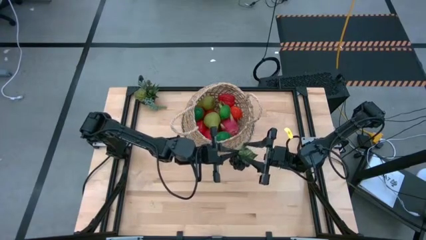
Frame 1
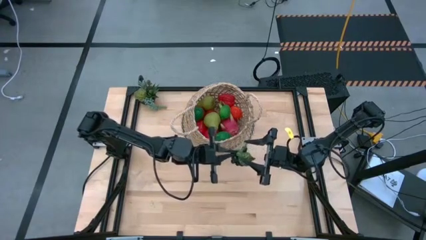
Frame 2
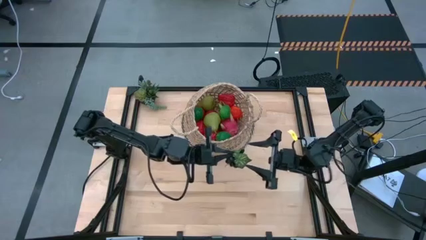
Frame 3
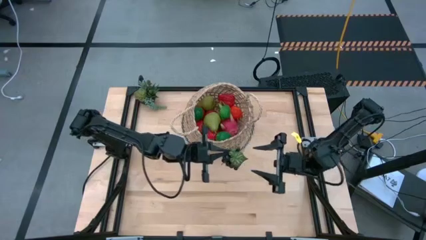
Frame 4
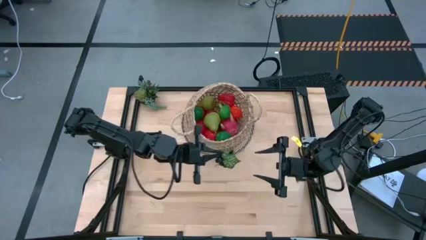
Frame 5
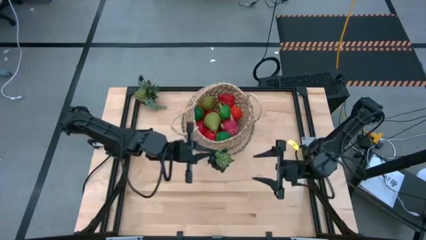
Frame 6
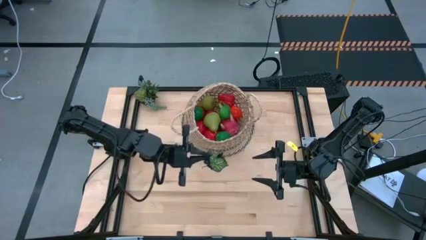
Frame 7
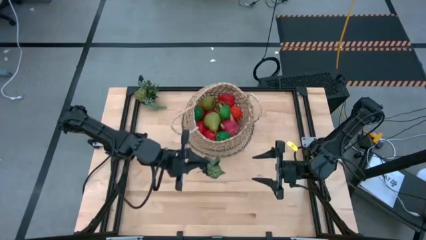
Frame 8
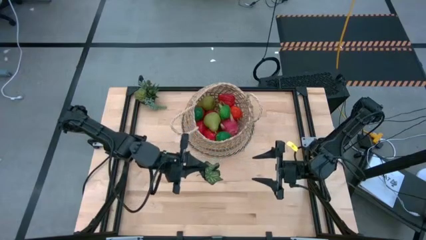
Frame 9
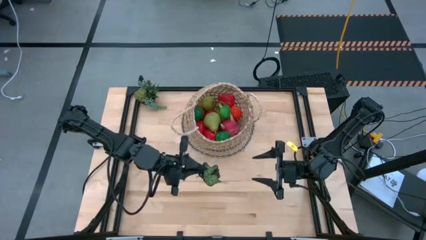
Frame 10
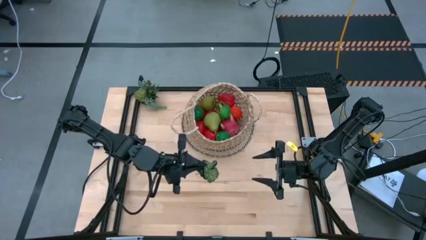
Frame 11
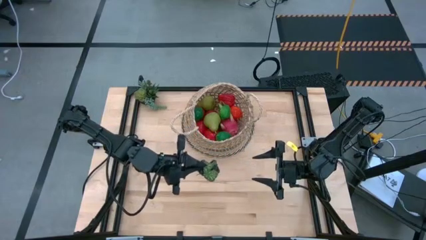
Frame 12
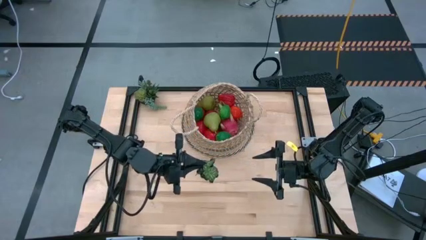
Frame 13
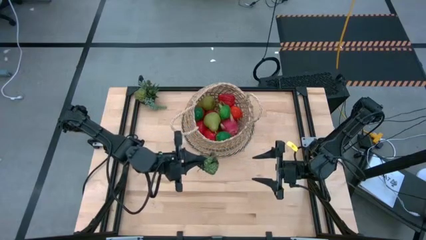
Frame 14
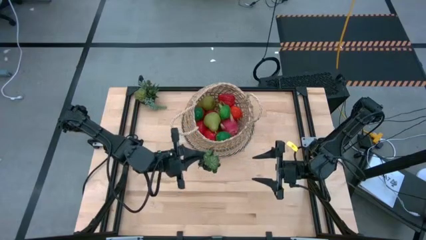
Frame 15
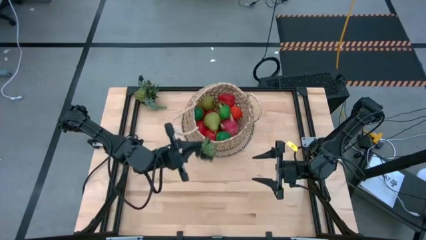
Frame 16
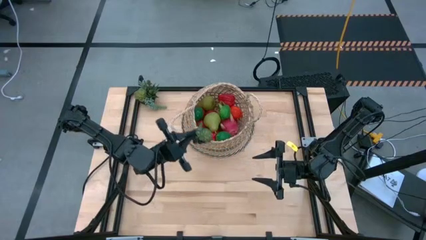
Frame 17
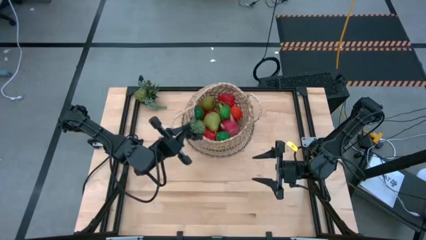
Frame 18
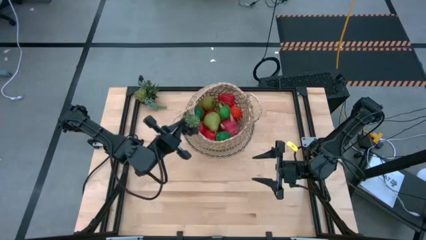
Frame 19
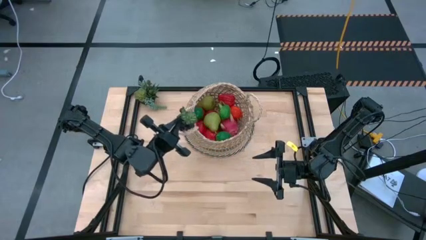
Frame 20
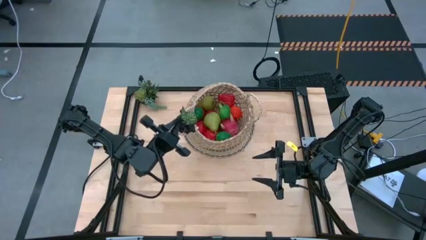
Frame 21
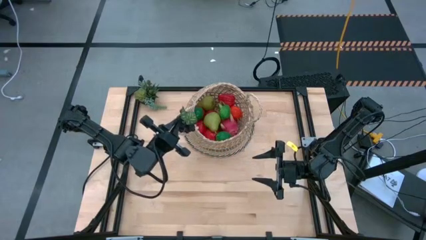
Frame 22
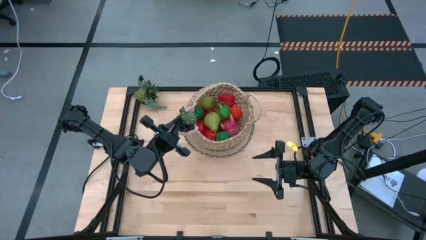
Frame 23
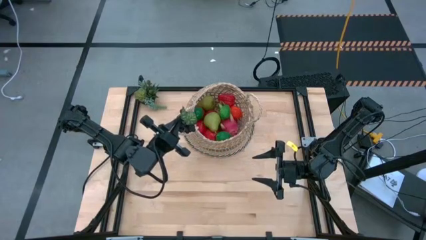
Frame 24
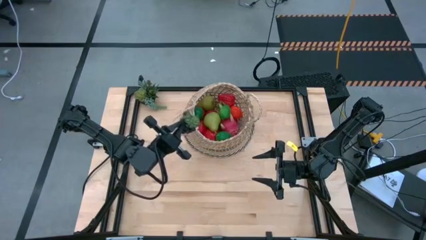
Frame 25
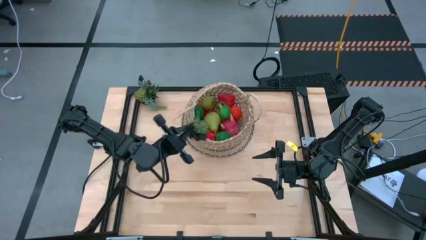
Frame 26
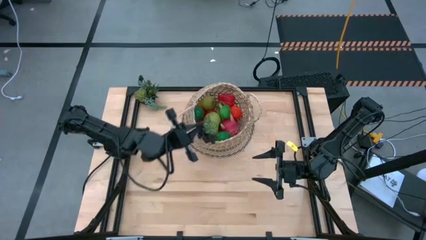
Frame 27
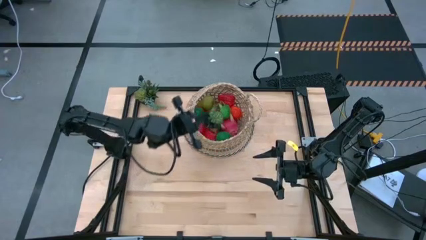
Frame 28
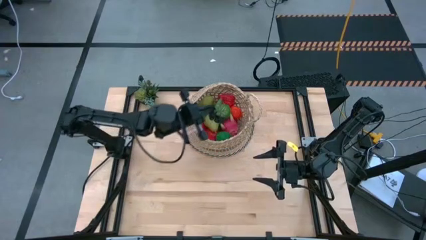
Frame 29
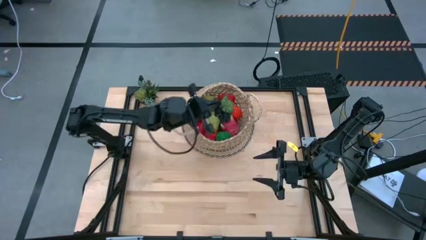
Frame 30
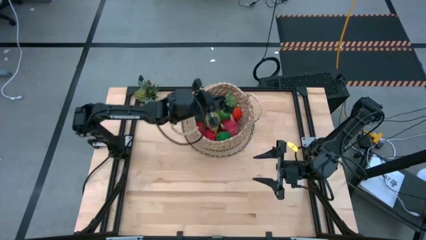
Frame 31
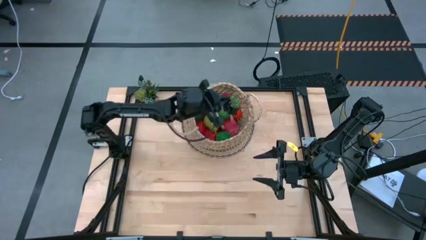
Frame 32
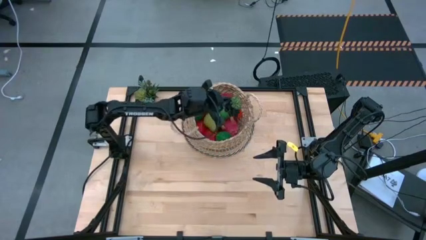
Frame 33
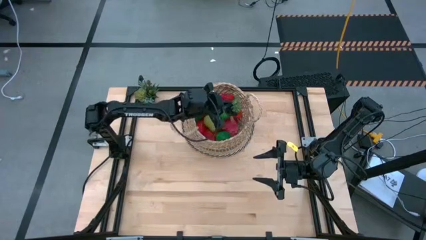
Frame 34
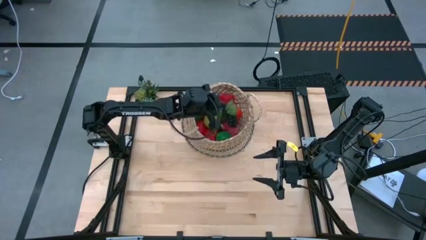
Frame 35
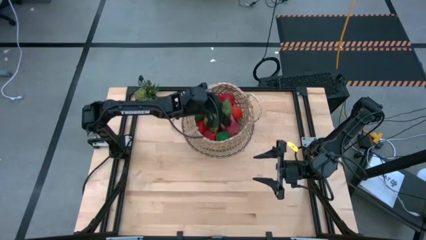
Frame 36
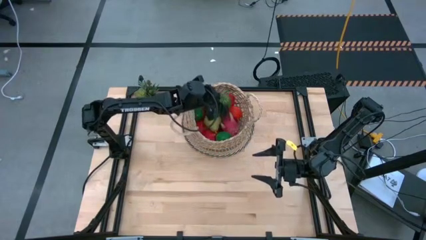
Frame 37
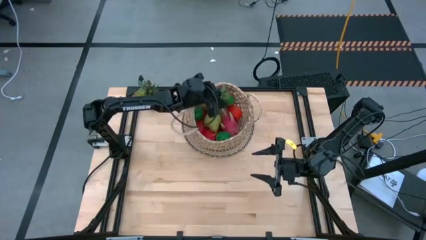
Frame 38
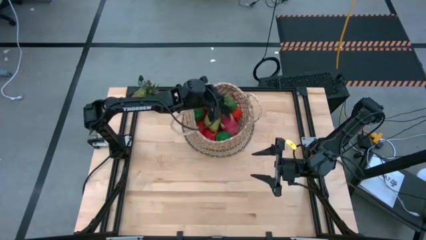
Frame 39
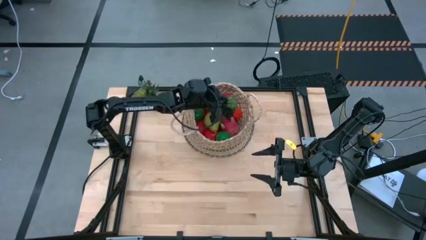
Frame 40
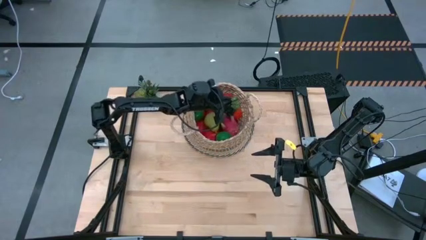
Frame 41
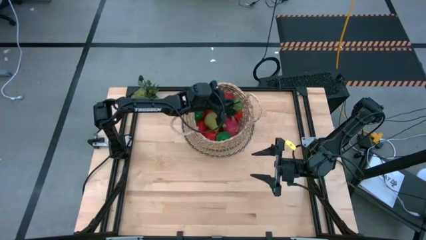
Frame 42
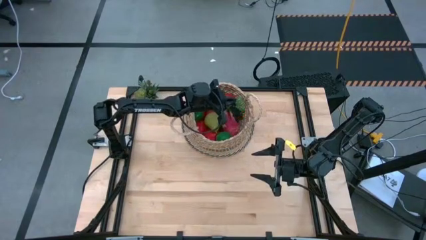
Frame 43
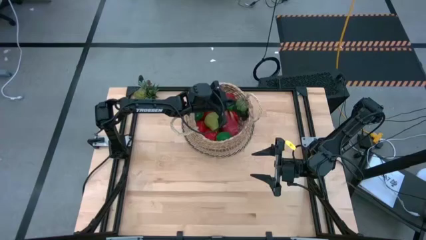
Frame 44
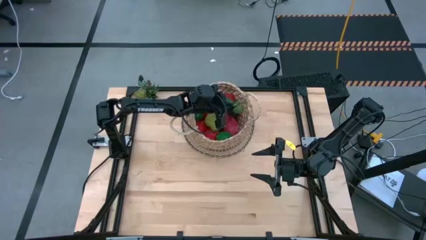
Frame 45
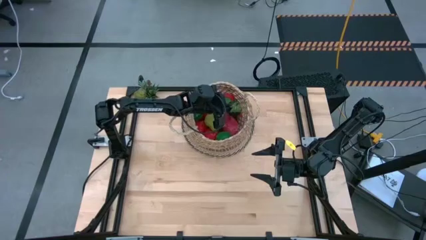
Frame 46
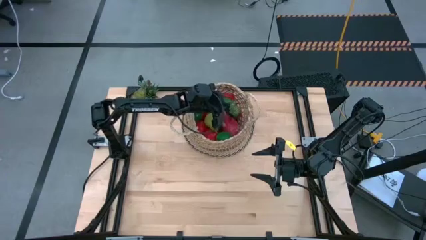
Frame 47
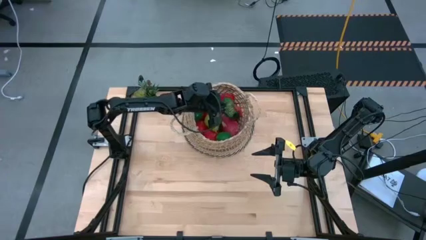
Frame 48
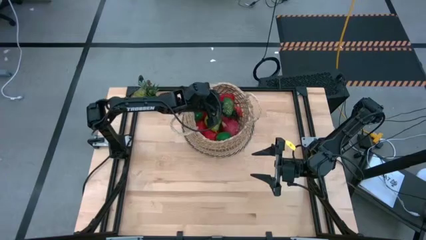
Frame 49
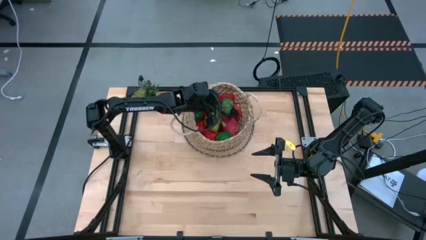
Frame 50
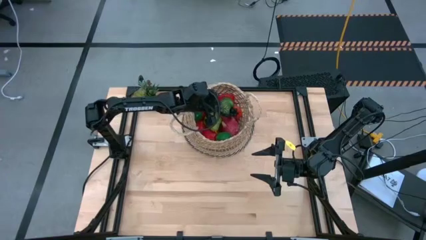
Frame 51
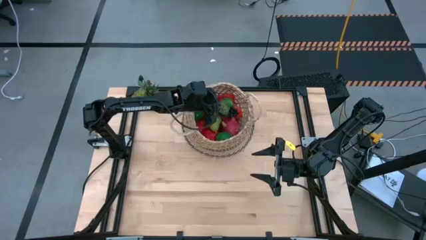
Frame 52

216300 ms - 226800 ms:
Task: Build produce basket
Put the grapes into the basket

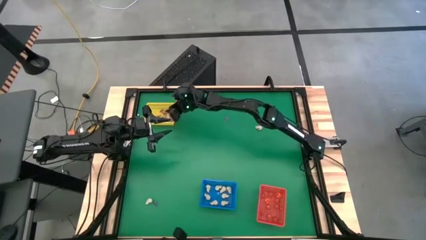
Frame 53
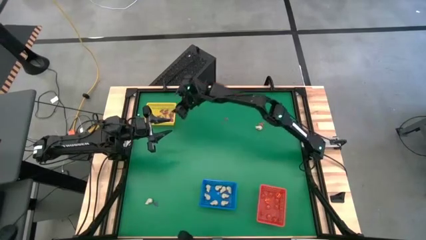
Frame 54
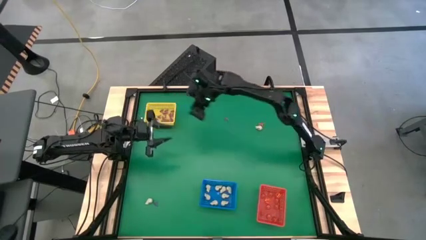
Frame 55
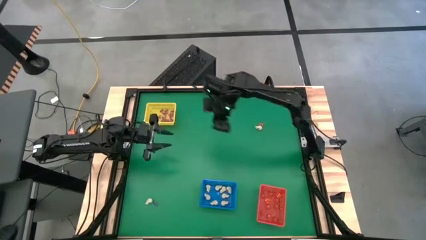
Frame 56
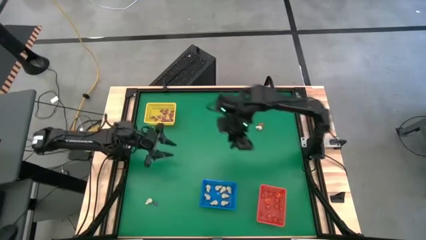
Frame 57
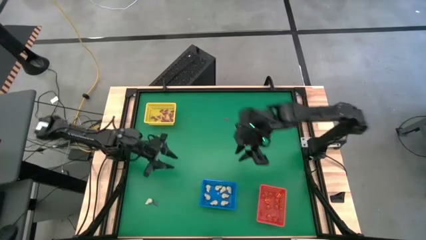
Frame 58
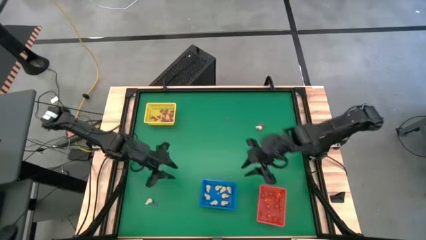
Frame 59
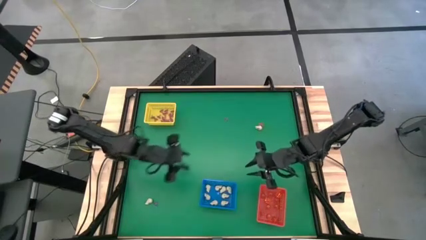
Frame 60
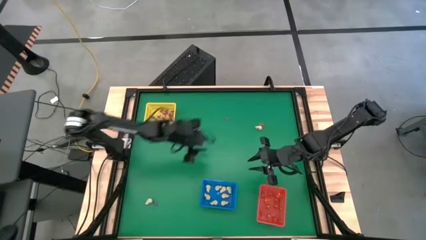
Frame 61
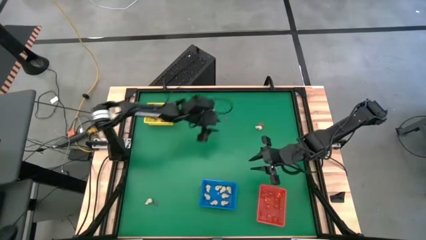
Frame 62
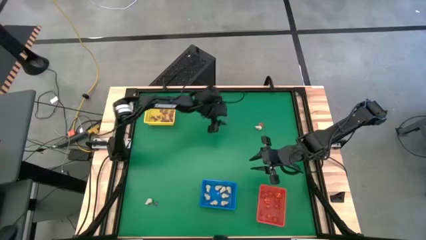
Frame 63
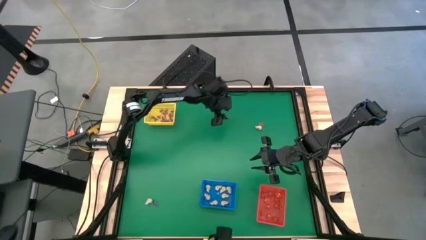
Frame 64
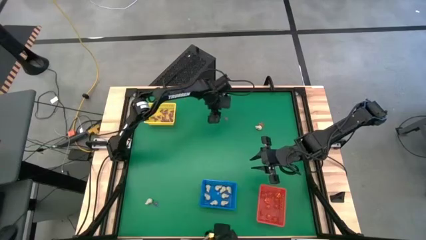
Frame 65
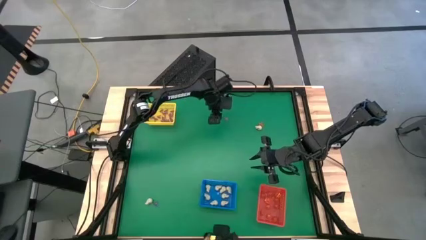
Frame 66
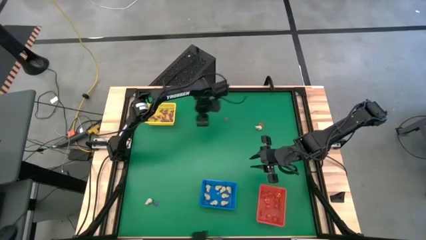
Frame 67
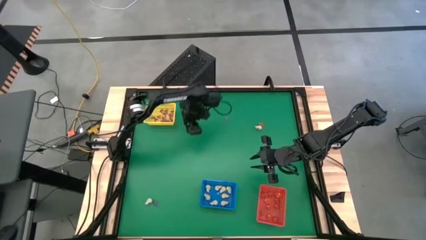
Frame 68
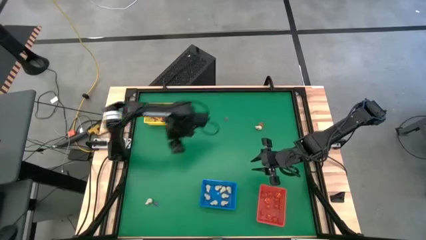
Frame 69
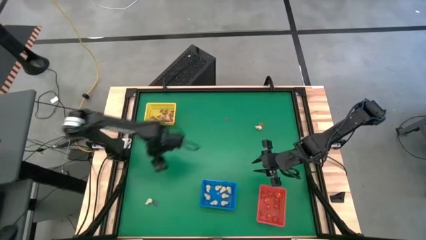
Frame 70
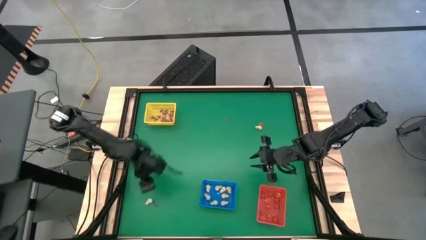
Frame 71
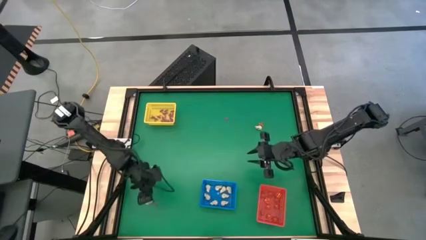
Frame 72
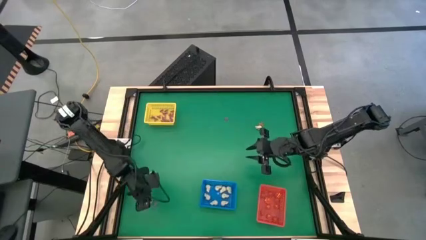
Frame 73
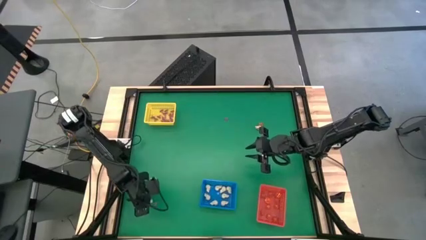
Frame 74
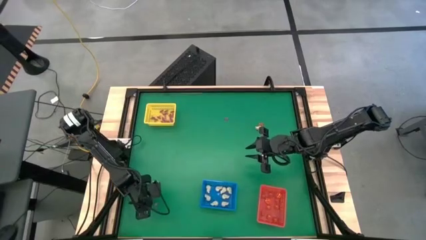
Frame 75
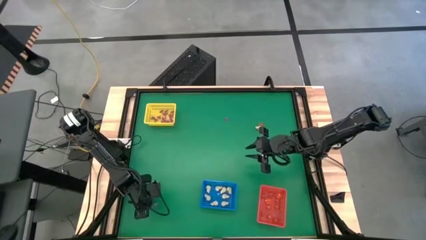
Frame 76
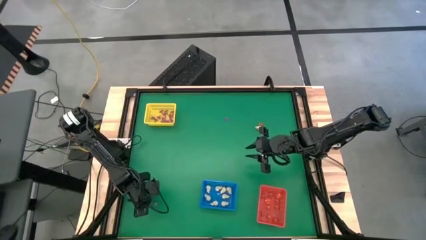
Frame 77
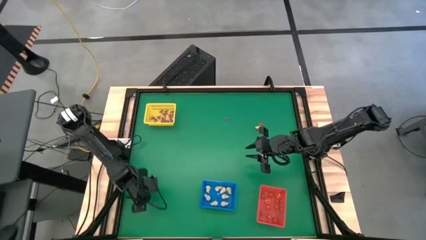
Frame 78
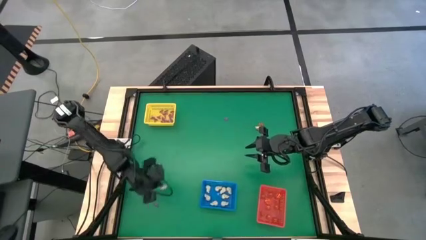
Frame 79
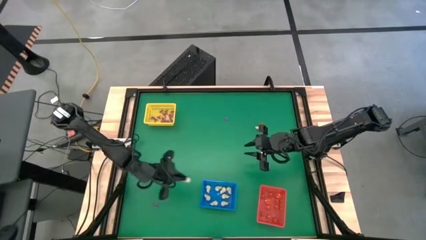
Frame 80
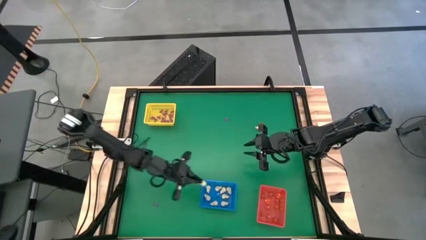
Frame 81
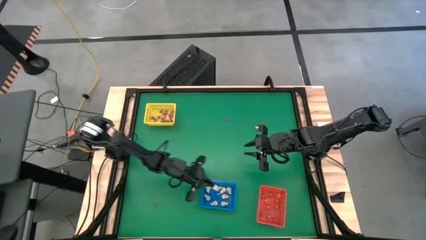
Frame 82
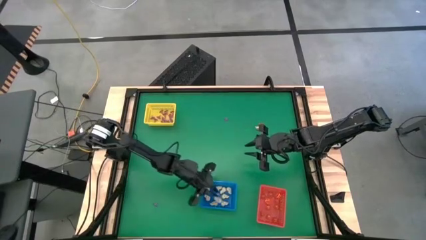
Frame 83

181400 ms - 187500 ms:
Task: Sort Halloween decoration
Put the white skull toy into the blue basket

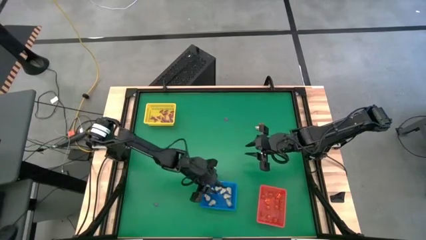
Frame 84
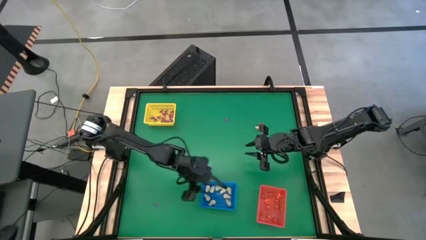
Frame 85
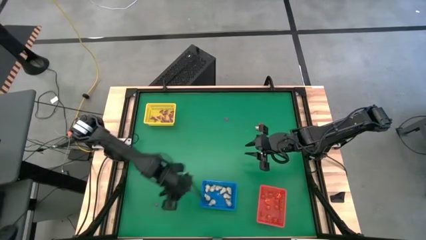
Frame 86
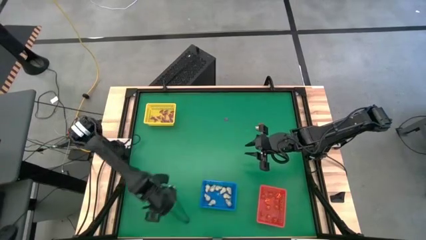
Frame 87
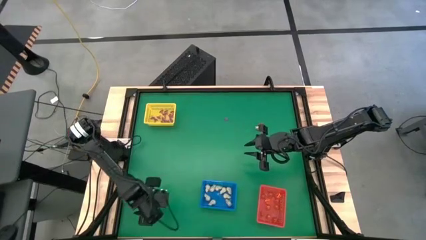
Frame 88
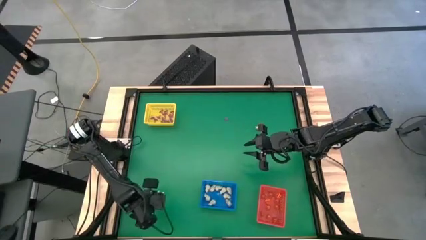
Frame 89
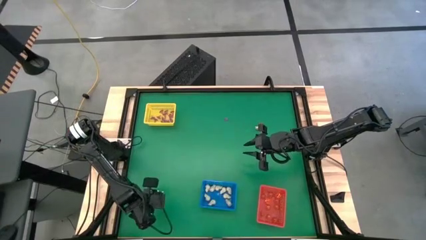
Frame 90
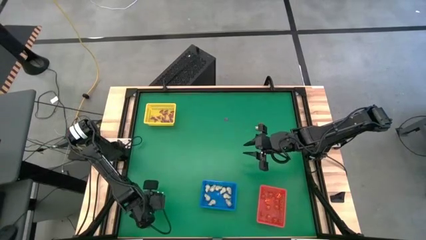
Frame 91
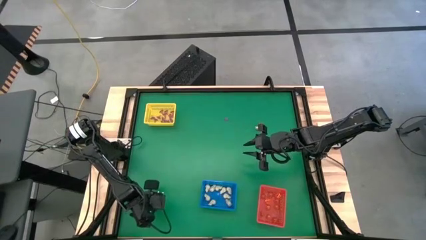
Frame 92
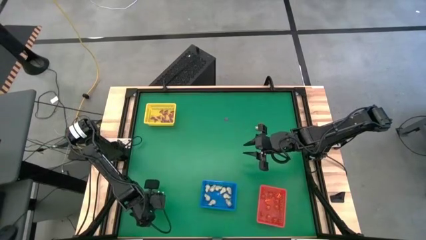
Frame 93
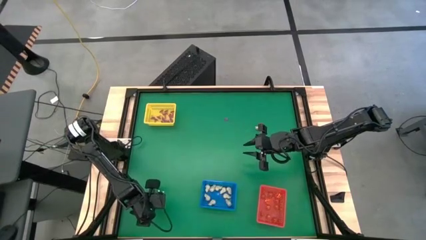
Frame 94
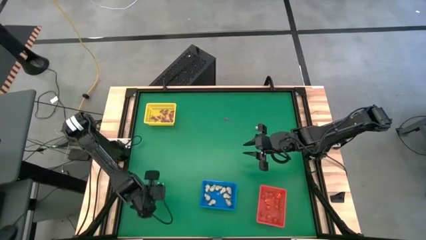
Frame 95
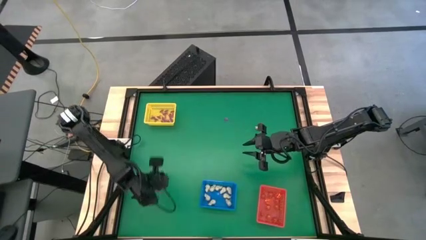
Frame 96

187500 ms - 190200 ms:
Put the purple witch hat toy into the yellow basket
